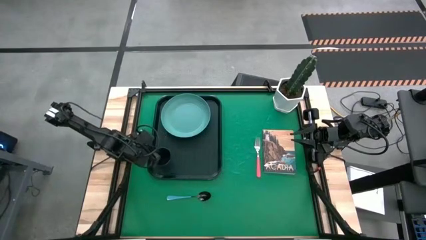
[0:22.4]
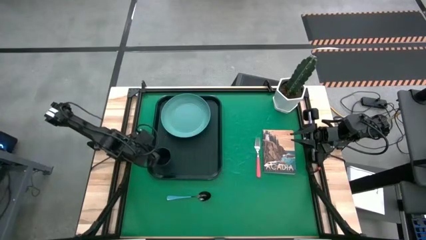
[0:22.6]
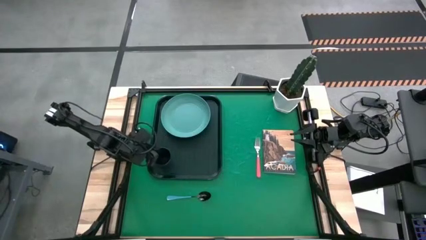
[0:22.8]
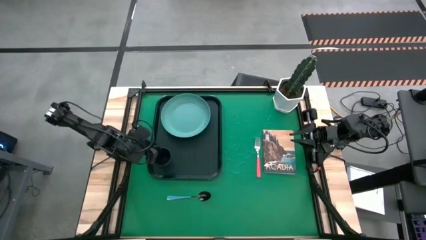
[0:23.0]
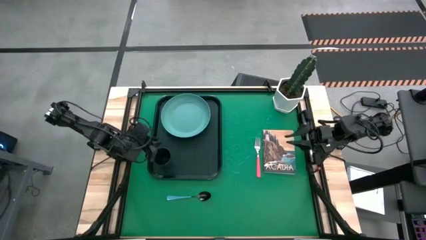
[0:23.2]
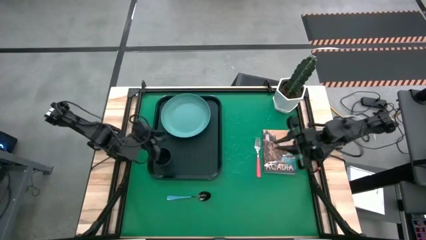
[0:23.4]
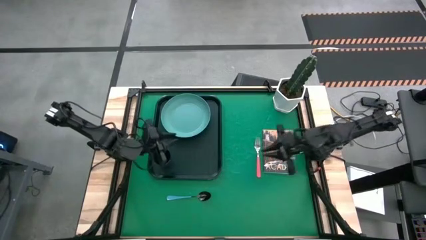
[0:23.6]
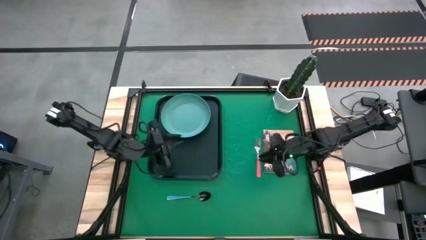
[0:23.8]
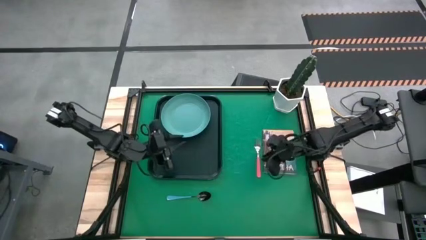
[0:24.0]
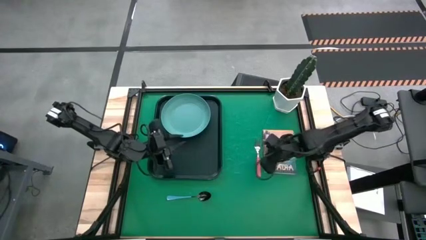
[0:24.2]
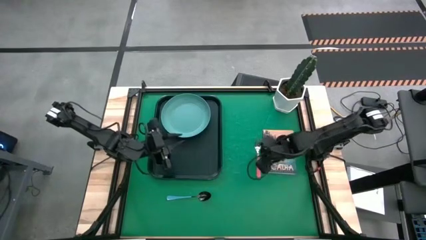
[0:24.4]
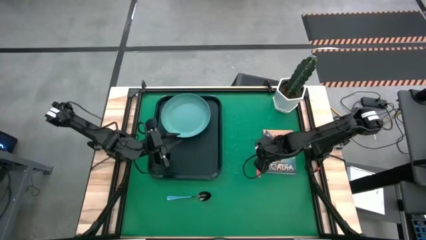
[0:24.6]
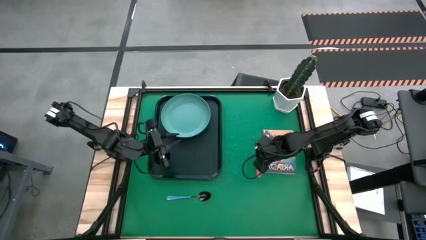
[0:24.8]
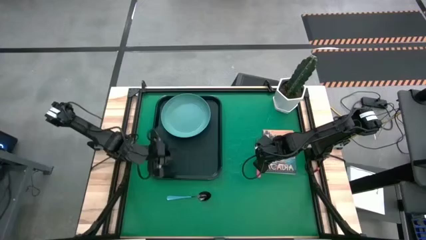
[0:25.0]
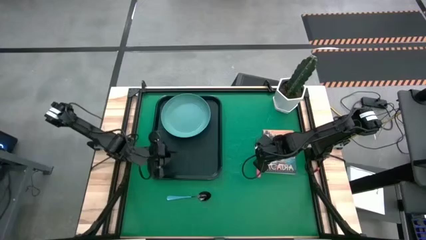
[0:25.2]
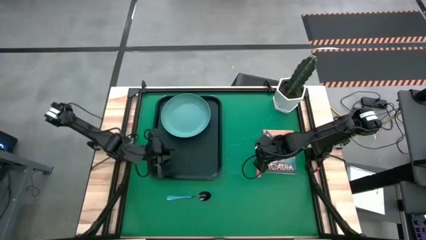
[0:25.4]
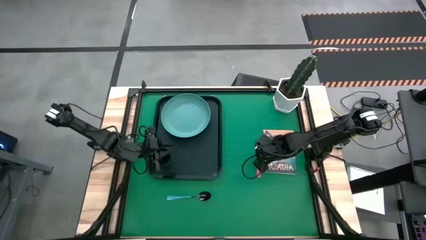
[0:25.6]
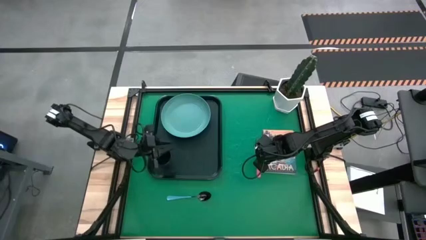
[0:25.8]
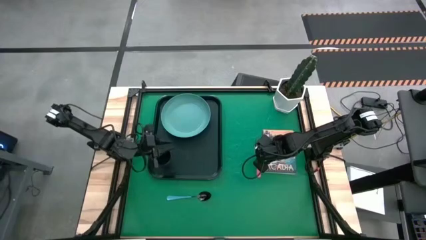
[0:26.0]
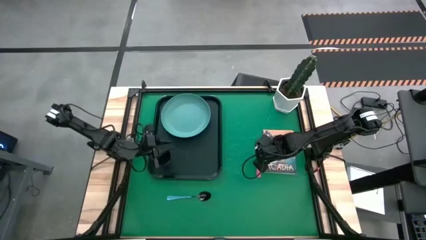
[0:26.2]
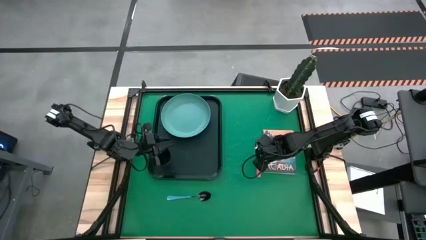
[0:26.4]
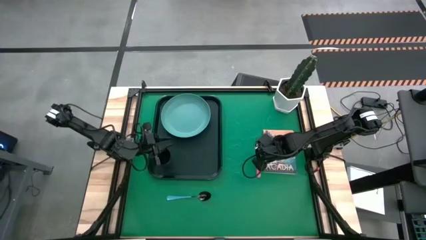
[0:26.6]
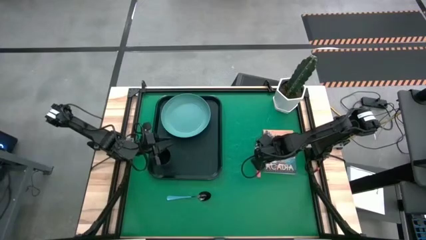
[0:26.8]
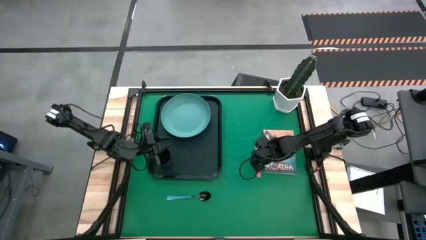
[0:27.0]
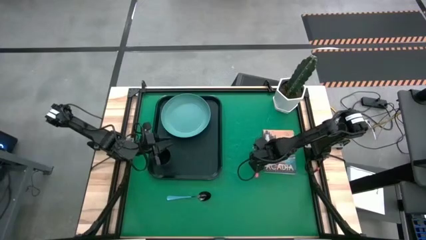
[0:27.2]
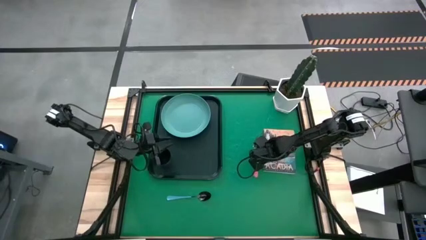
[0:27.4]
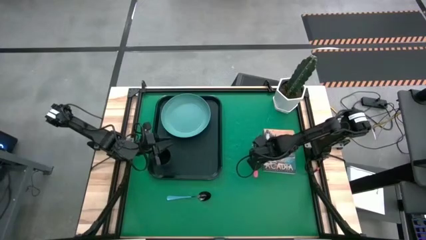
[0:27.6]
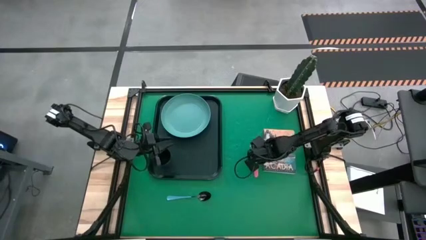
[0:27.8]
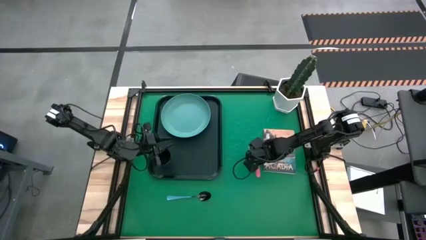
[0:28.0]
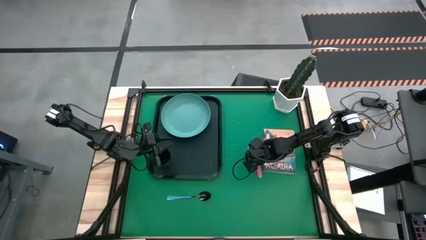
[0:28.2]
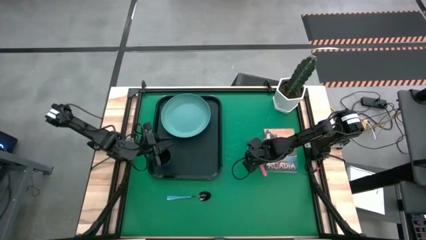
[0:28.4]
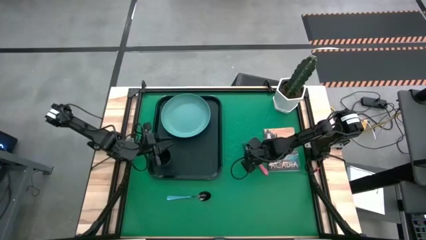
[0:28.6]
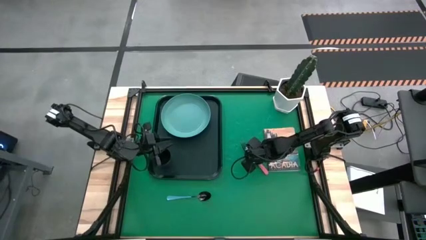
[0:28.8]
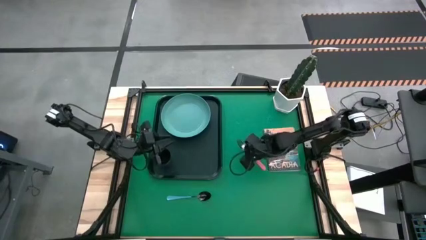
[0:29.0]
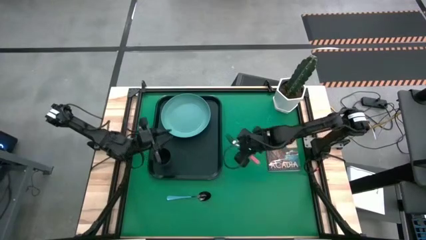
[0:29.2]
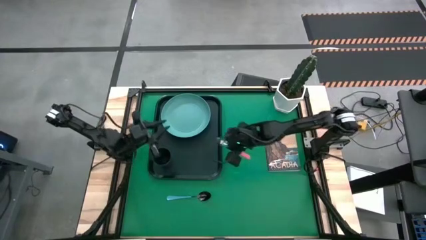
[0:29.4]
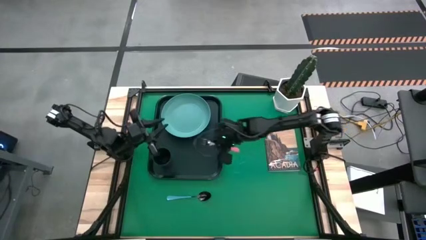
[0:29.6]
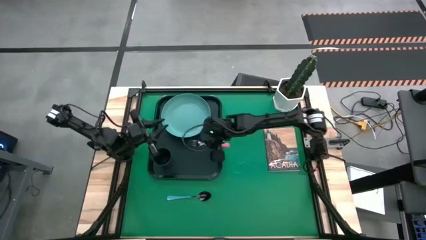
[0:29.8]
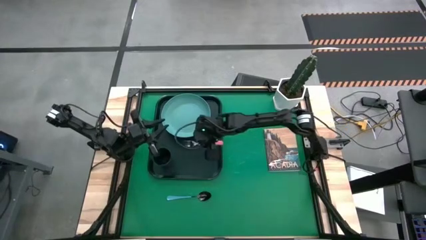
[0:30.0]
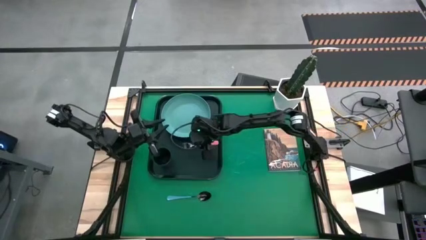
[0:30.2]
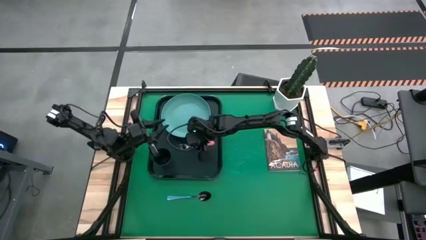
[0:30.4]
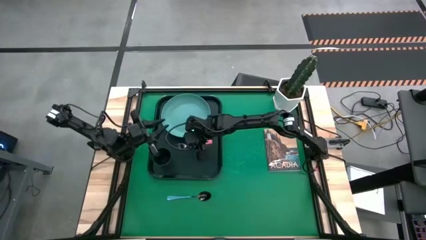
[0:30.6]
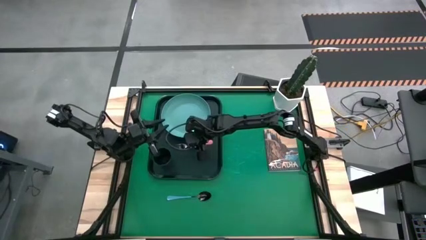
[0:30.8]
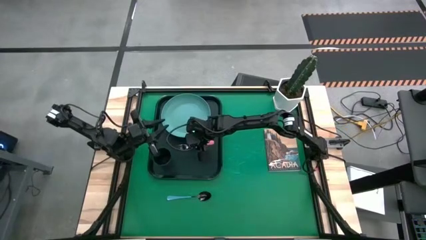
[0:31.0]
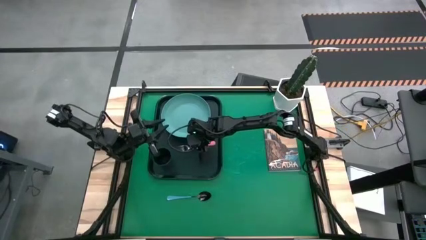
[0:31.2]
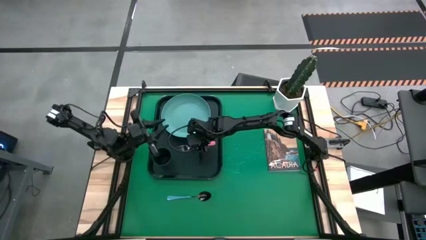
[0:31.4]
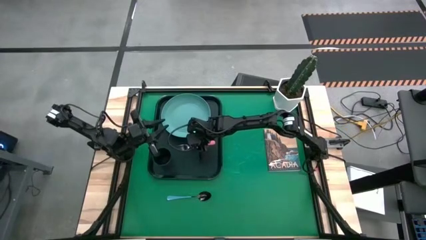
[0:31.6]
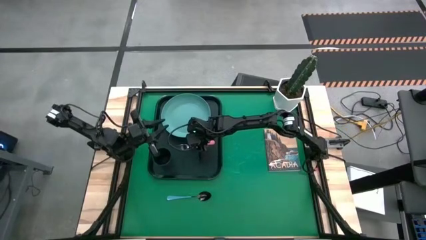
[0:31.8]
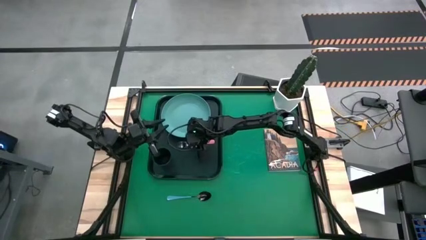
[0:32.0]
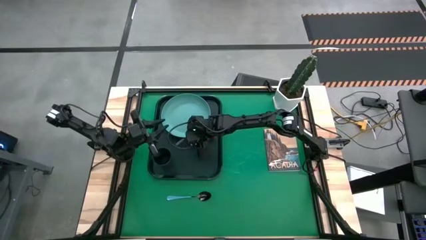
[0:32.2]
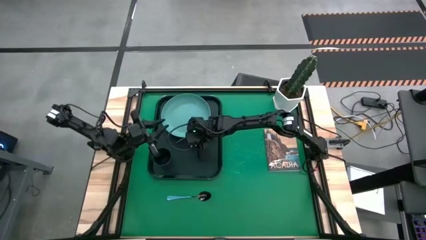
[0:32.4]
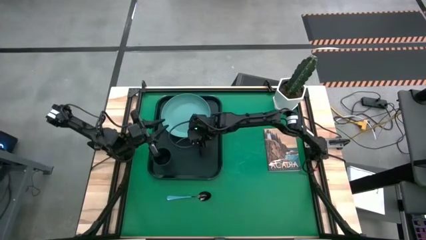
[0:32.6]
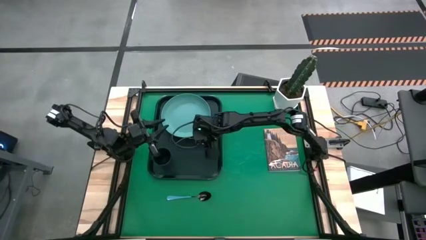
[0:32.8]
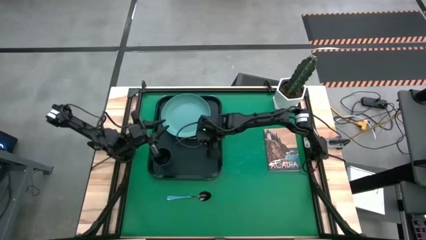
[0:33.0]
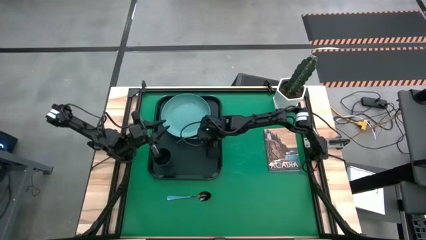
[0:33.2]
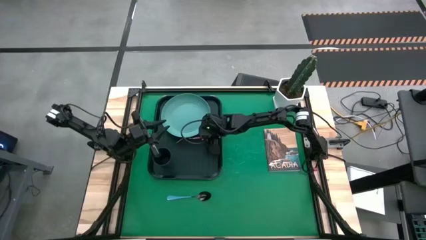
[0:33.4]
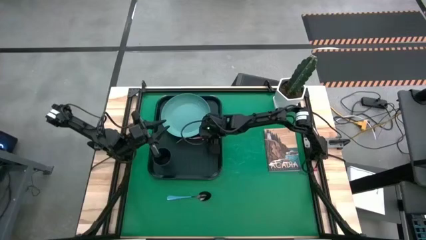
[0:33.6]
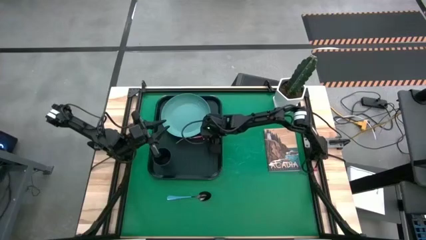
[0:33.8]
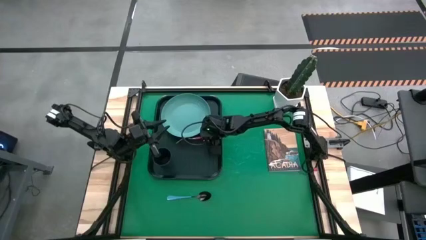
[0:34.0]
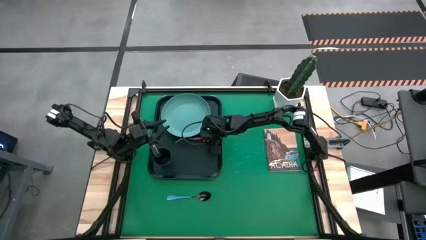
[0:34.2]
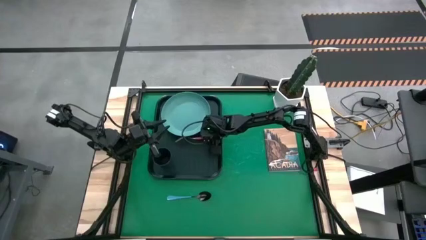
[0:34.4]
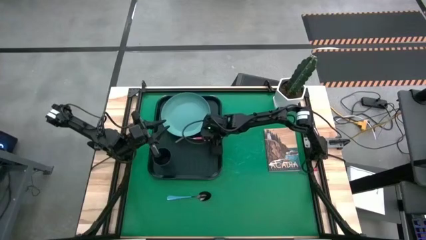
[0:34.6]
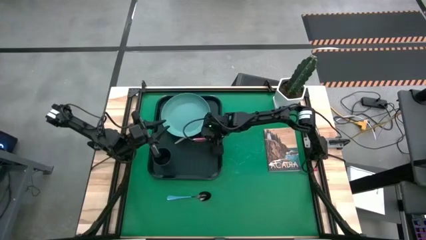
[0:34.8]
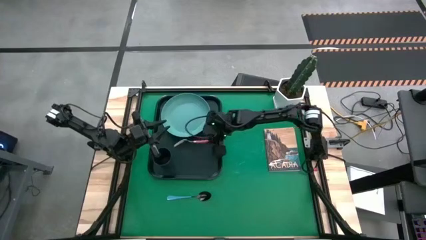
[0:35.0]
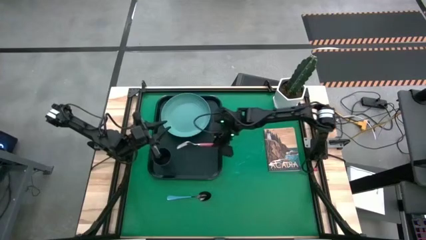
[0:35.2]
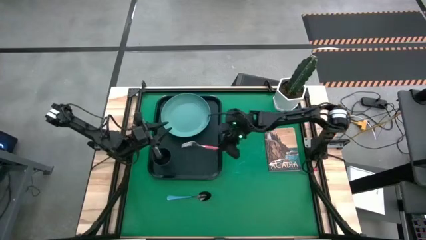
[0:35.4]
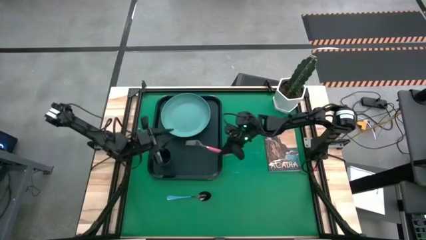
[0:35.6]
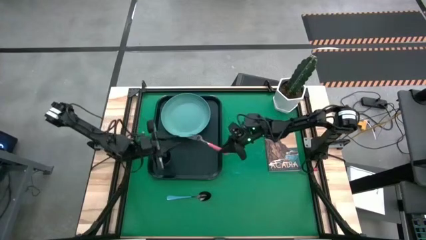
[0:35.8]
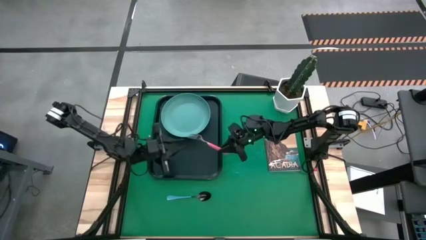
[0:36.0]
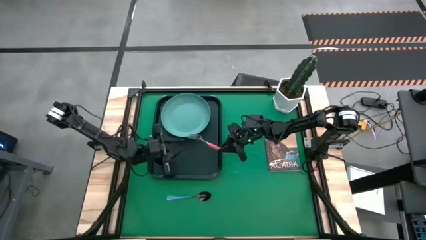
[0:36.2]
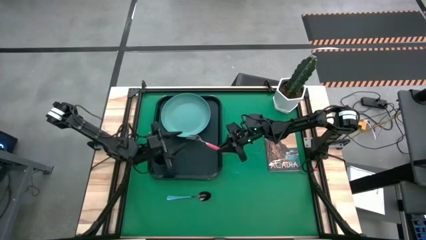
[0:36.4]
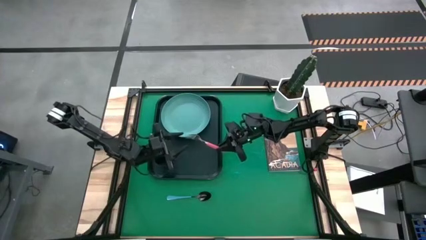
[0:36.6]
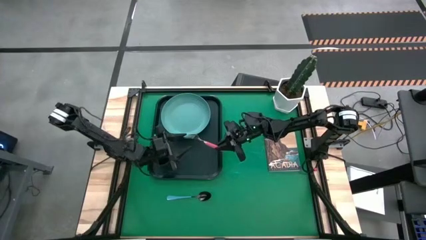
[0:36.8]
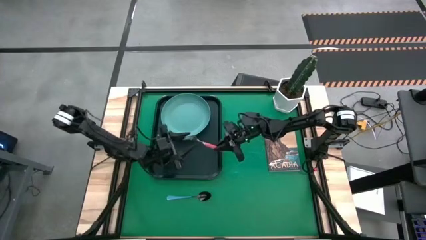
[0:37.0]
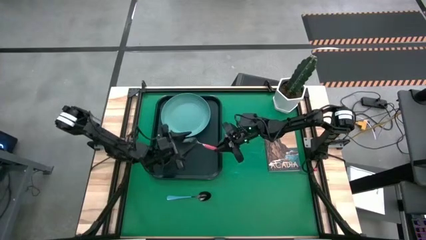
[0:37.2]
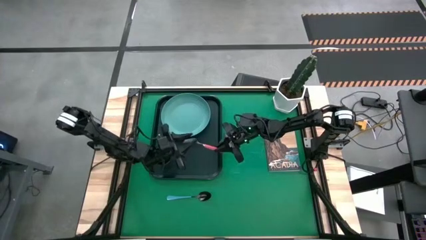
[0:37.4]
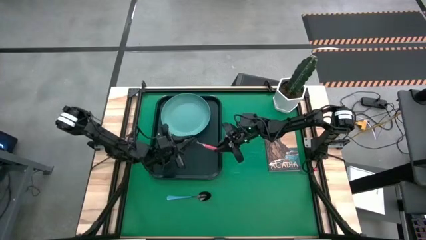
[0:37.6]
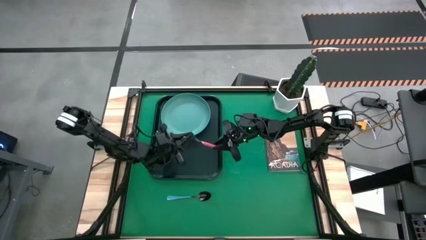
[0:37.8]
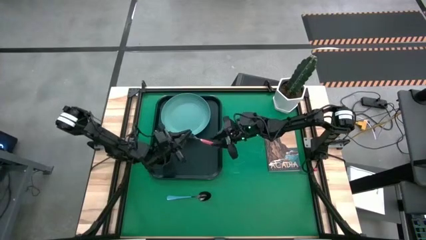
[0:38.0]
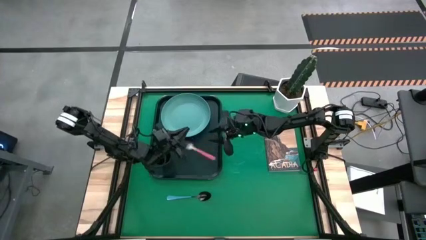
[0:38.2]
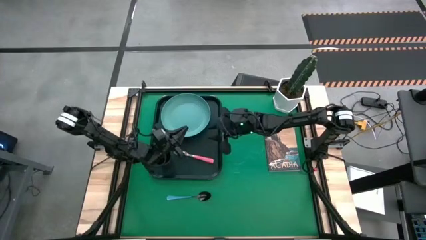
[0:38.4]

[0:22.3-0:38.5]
Task: Pick and place plate/cup/fork/spoon on tray
Put the pink fork on the black tray

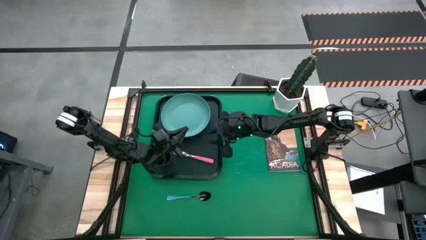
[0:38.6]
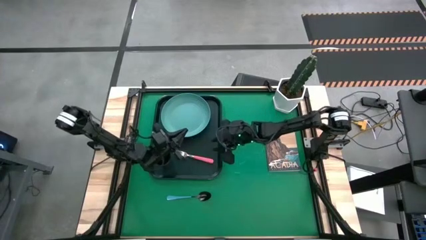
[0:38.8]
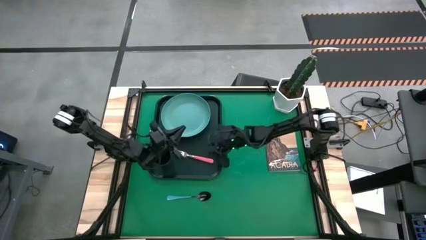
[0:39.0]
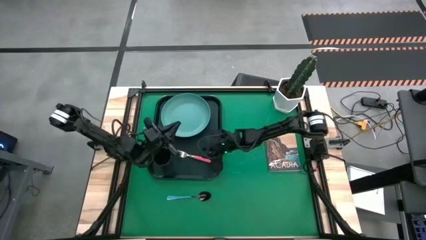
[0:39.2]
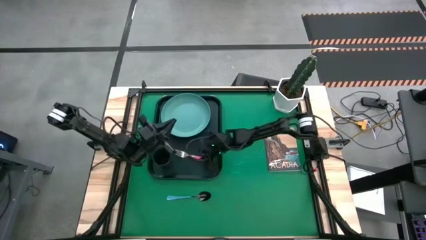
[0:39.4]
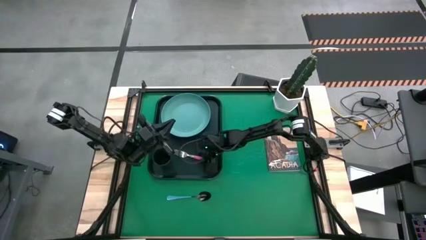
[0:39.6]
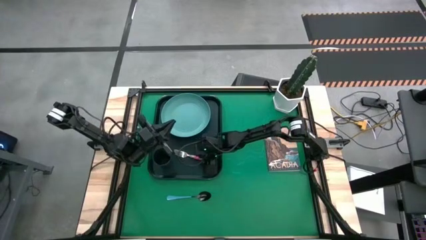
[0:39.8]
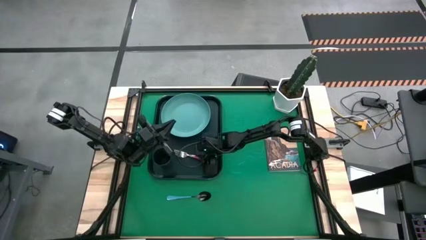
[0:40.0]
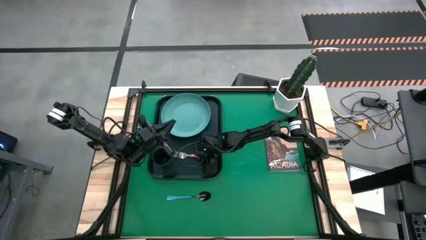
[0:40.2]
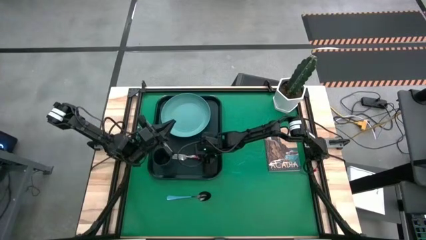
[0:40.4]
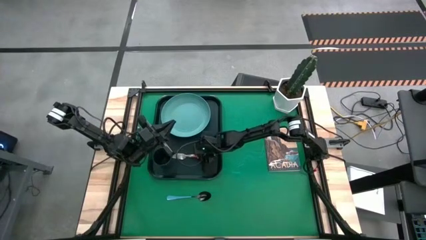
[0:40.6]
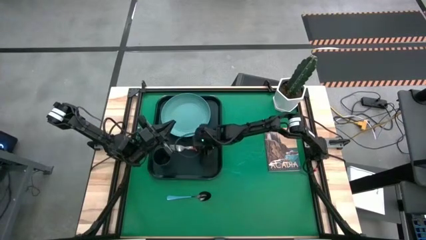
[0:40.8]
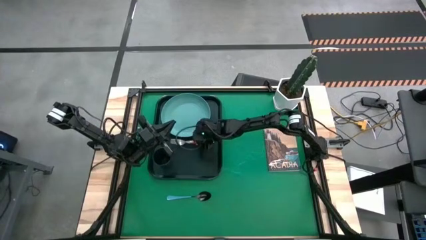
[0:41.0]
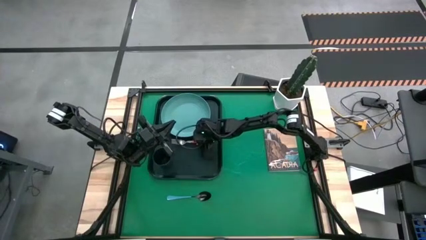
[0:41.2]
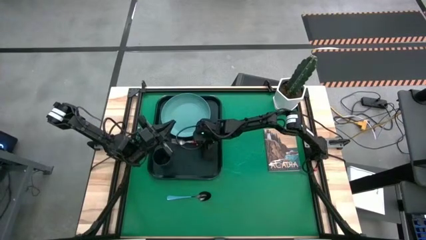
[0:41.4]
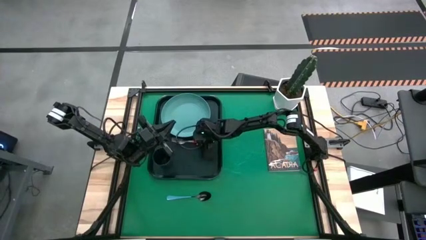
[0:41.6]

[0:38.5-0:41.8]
Put the pink fork on the black tray
